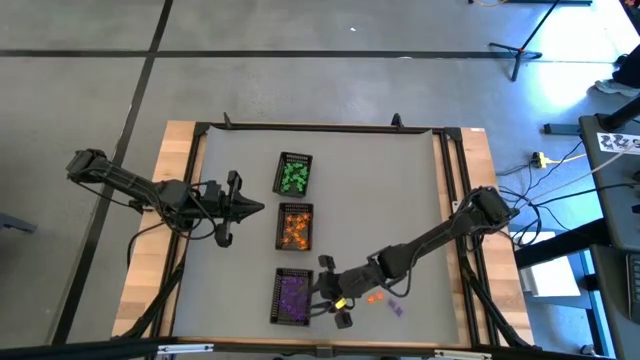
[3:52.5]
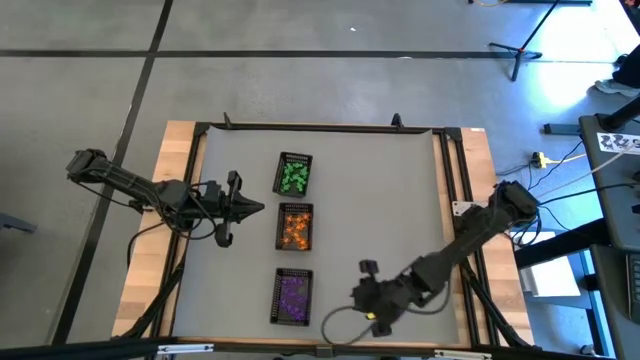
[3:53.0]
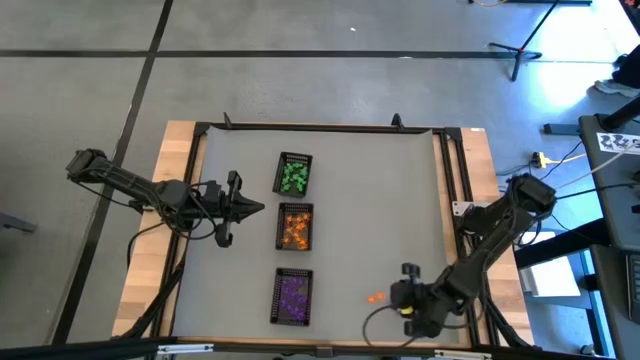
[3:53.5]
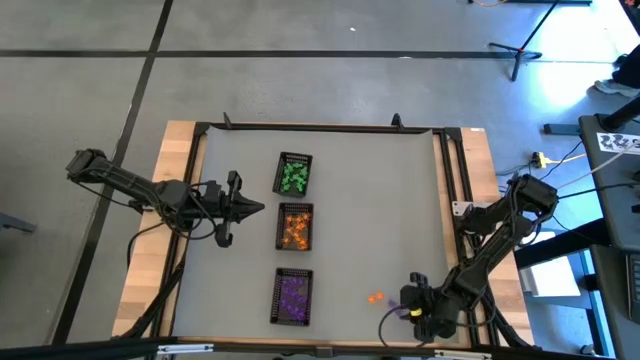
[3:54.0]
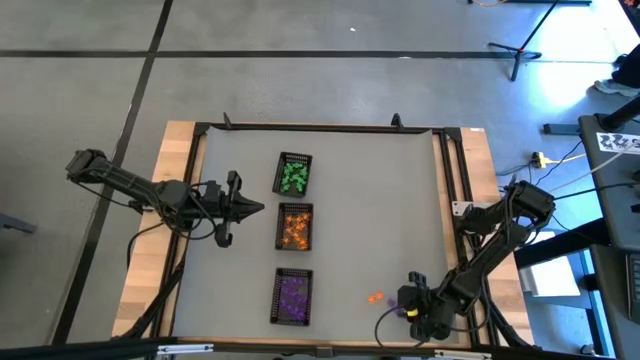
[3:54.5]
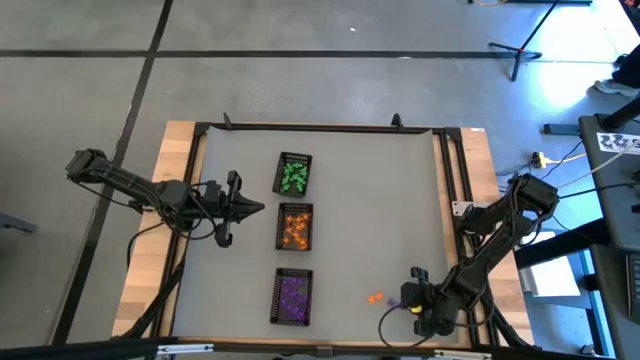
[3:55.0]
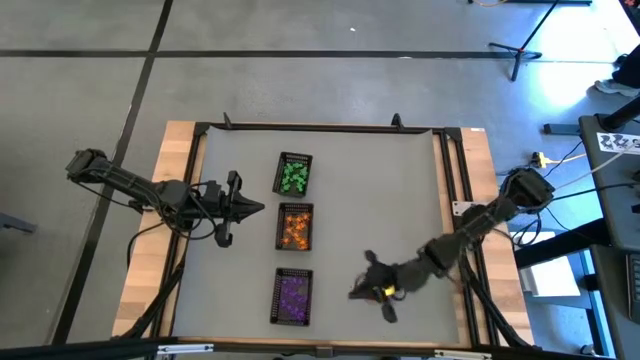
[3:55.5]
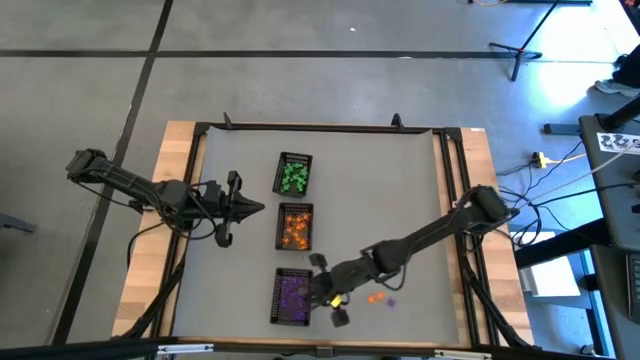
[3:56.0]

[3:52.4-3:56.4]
Task: Sort Halloween decoration
Put the violet spider toy into the bottom black bin

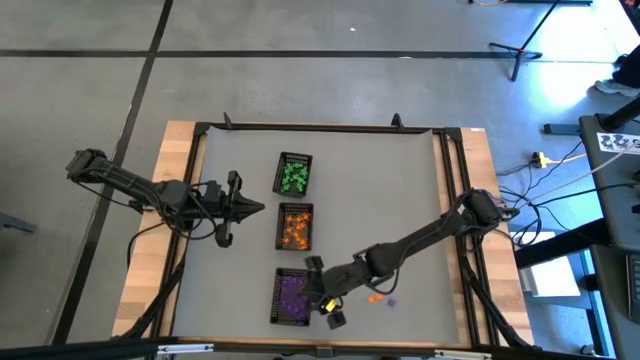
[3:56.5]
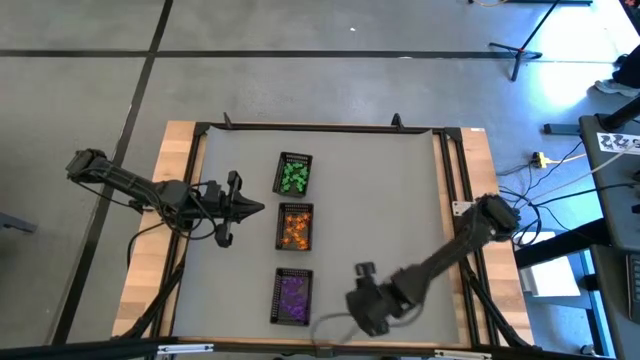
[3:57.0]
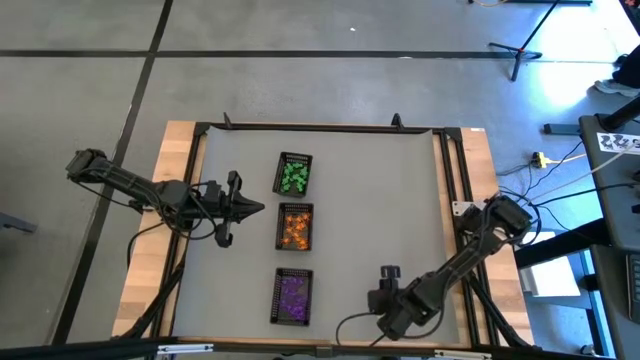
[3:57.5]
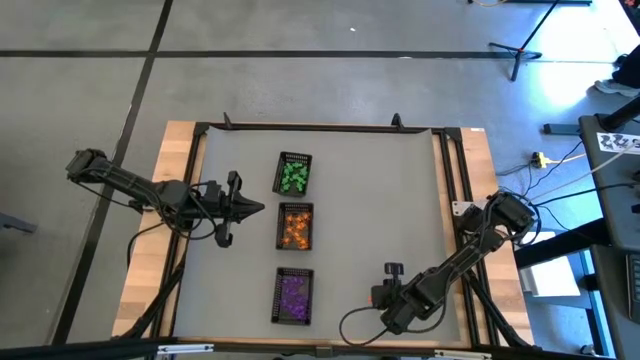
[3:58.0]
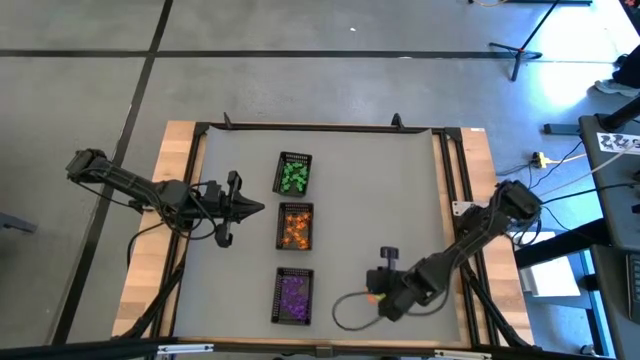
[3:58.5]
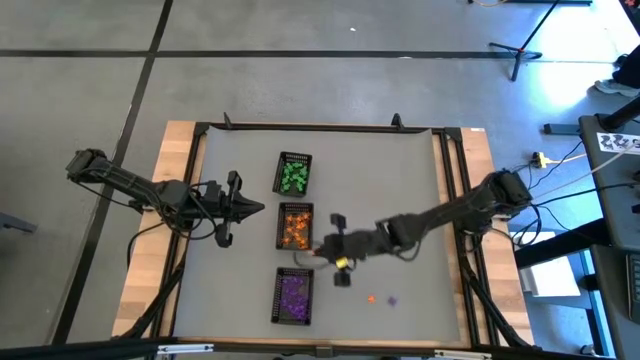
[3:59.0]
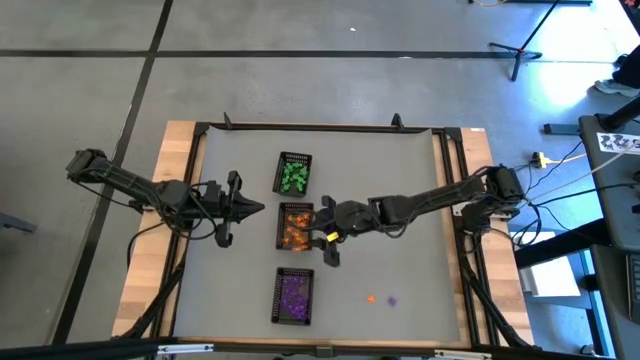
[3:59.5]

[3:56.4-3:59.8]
Put the orange spider toy into the middle black bin

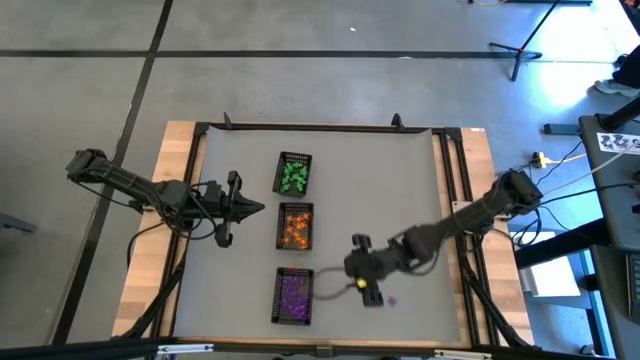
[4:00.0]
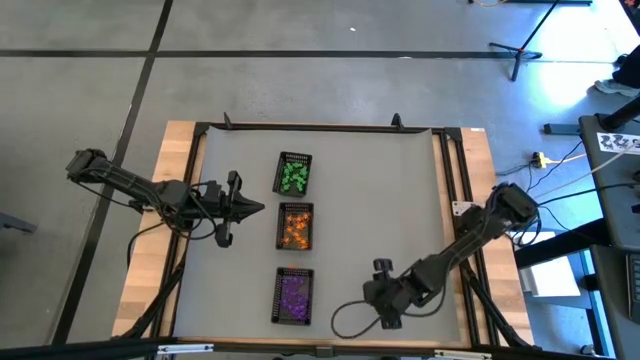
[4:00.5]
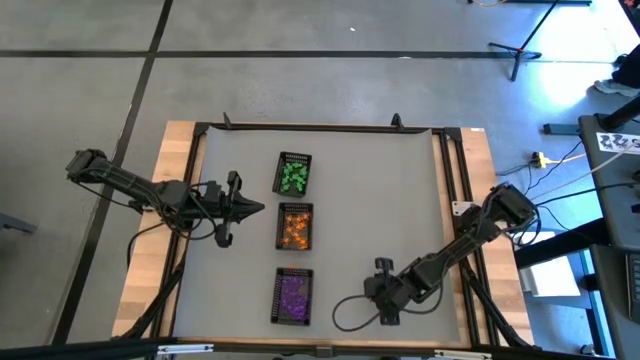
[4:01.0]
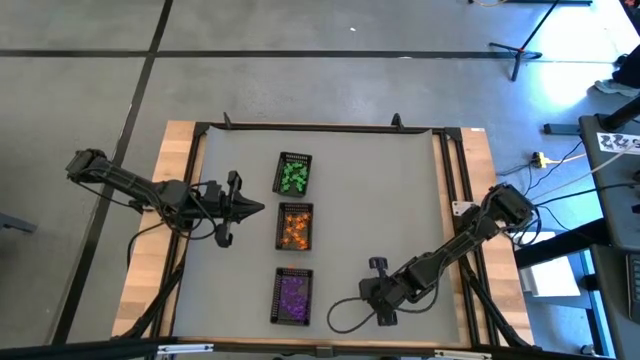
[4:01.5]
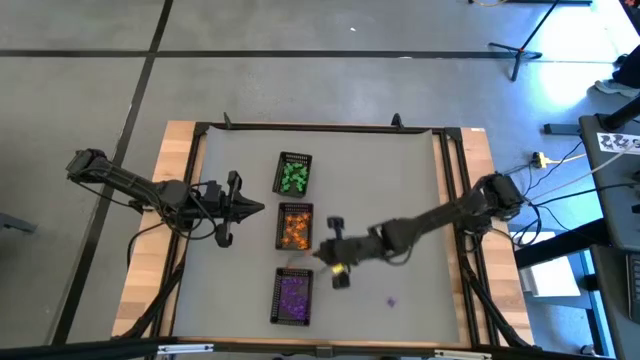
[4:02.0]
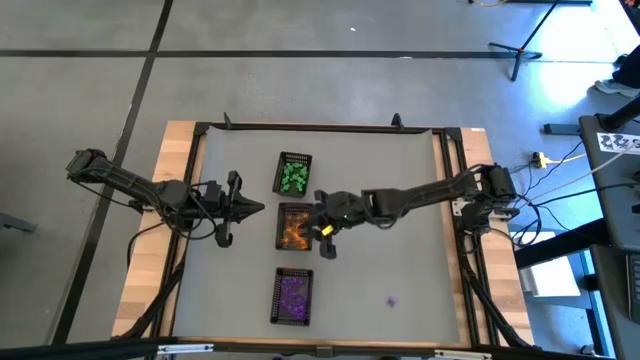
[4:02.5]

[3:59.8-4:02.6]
Put the orange spider toy into the middle black bin

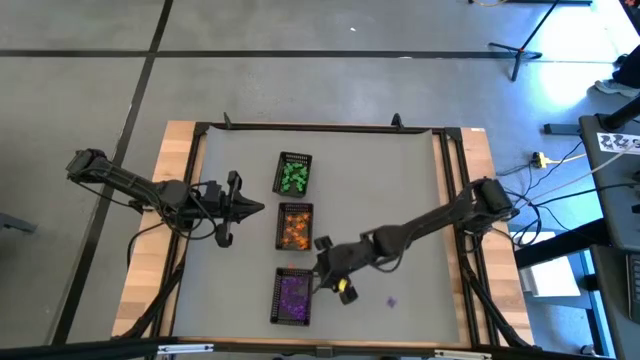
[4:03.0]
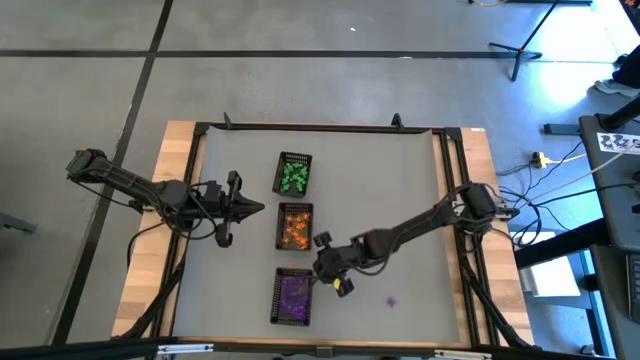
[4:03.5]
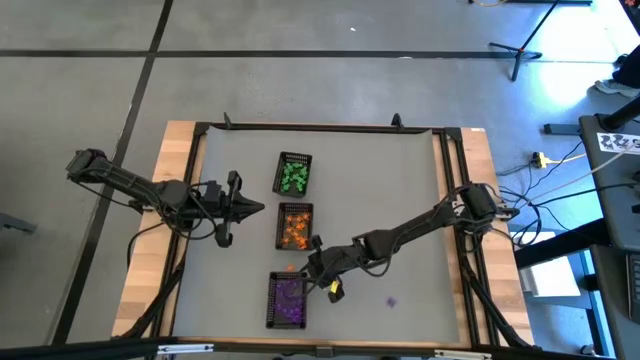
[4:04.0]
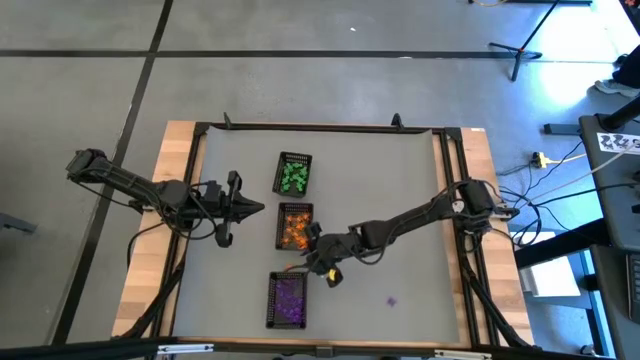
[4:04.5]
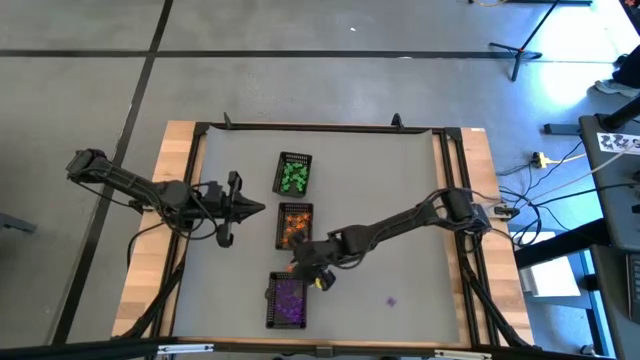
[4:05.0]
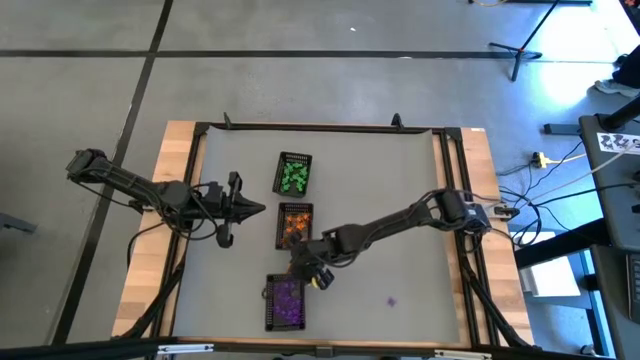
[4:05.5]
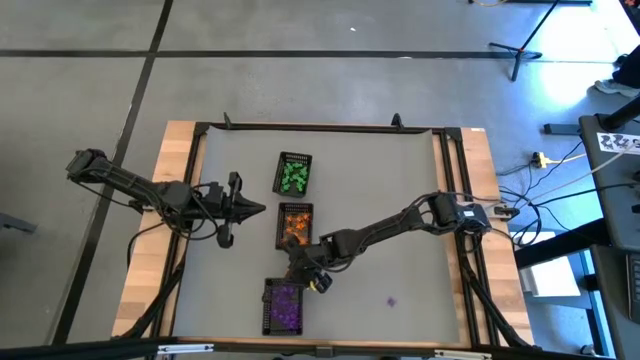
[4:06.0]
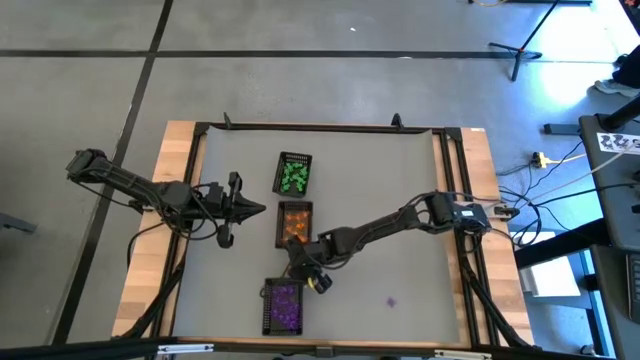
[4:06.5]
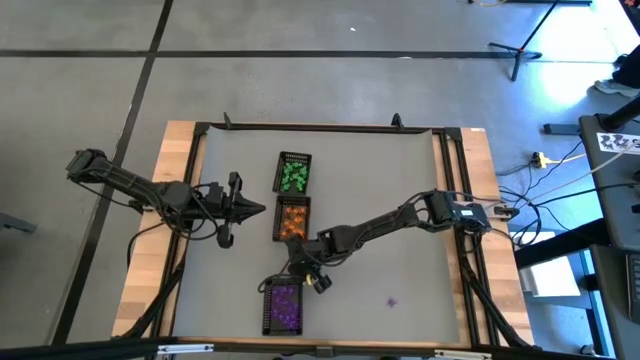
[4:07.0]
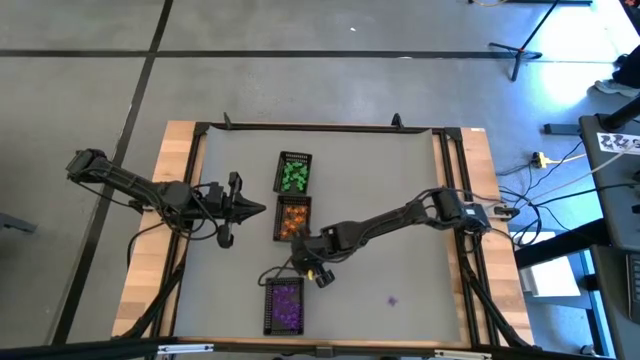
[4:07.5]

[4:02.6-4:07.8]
Put the orange spider toy into the middle black bin

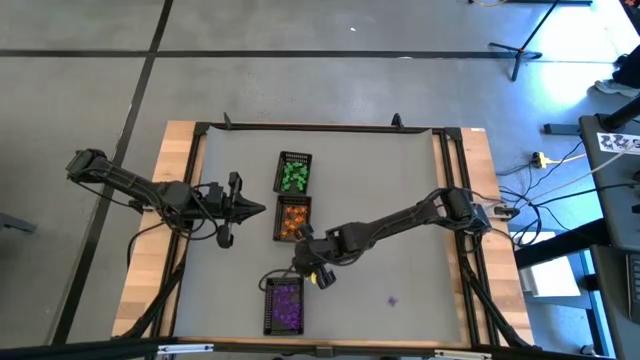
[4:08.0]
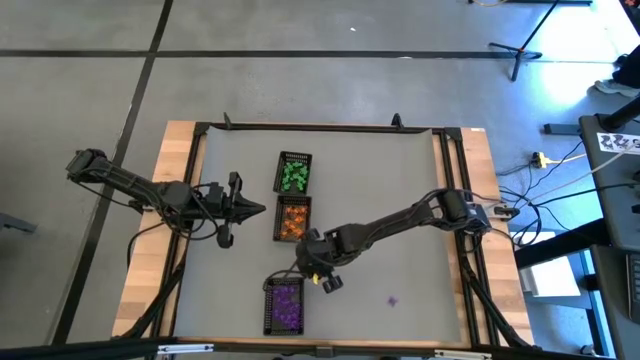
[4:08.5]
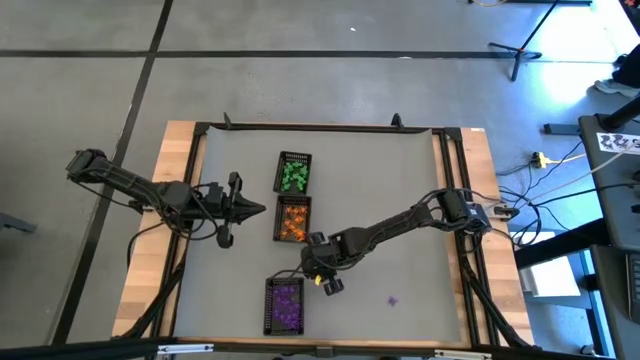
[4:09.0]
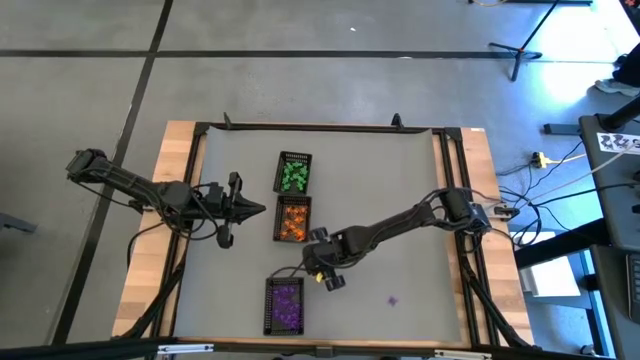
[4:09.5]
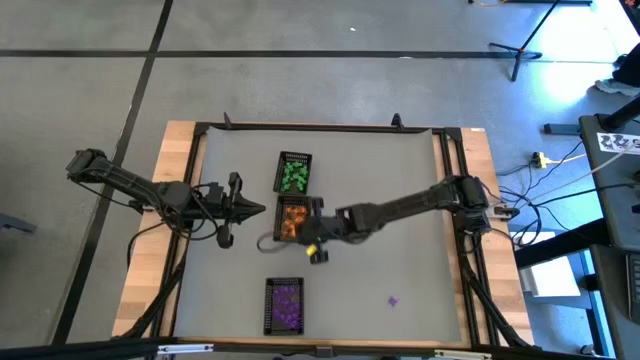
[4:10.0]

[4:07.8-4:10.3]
Put the orange spider toy into the middle black bin

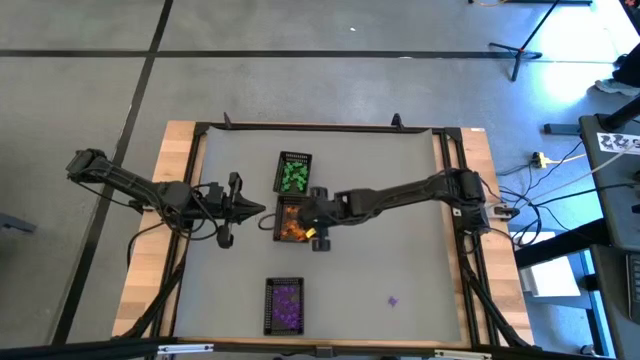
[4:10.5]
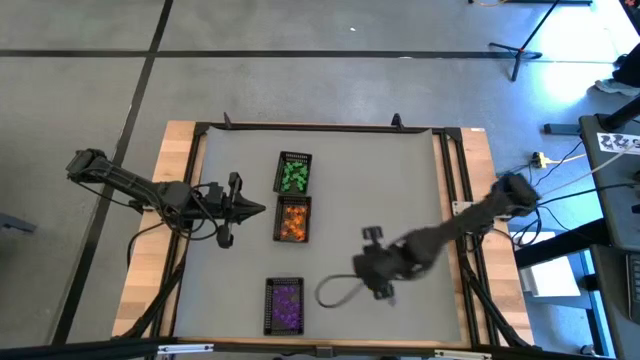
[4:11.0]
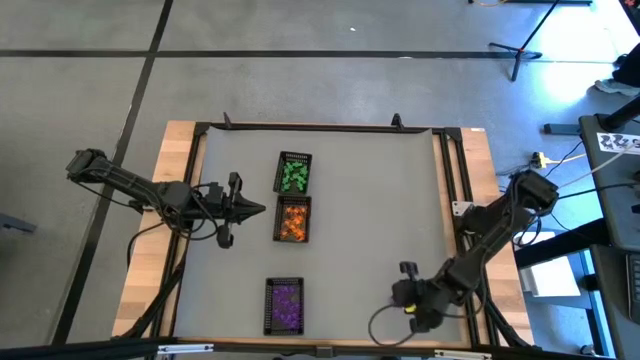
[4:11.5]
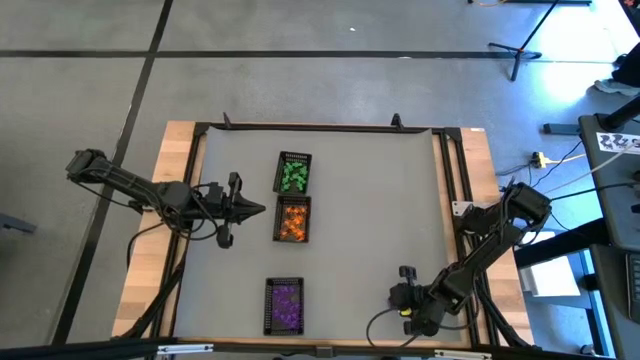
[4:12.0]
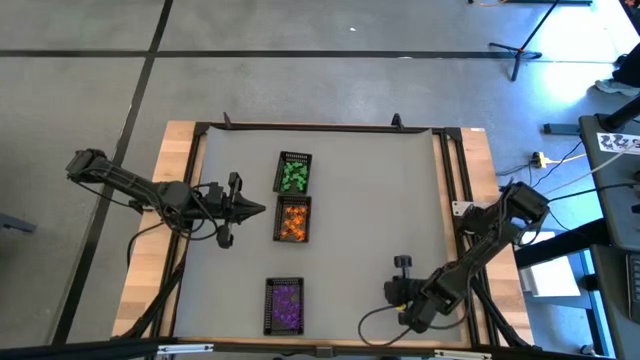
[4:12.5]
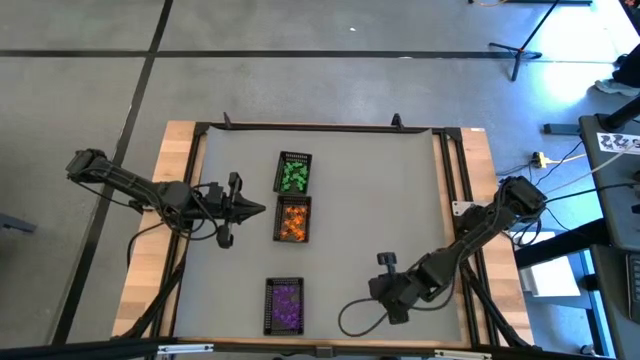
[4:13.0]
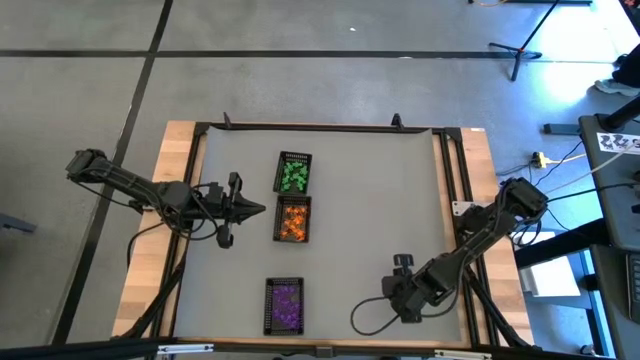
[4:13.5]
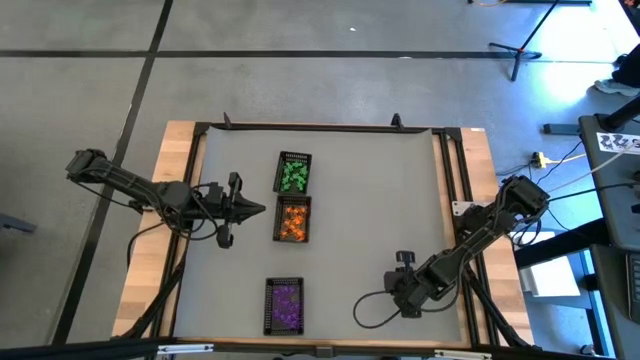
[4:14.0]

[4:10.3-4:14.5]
Put the violet spider toy into the bottom black bin
